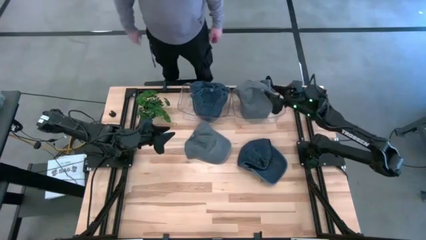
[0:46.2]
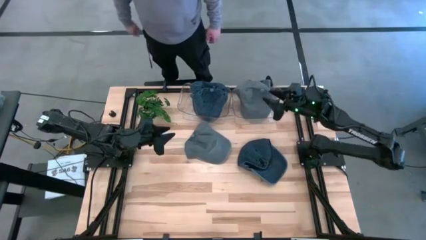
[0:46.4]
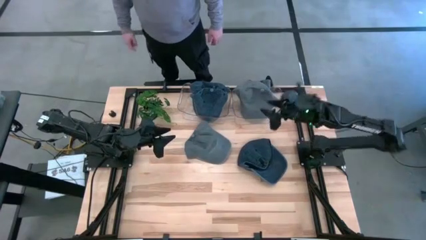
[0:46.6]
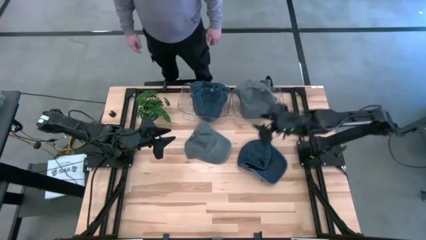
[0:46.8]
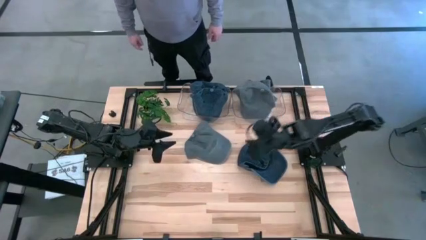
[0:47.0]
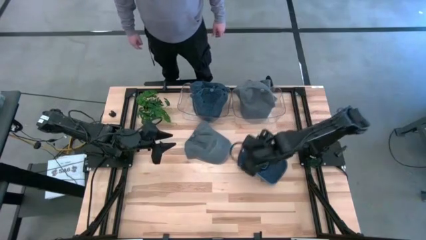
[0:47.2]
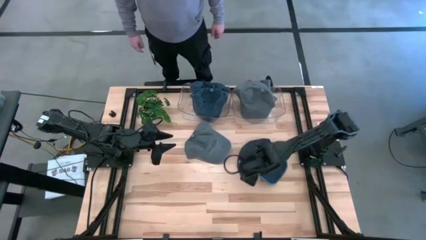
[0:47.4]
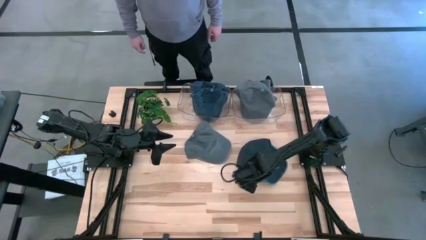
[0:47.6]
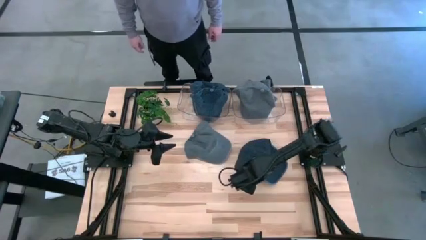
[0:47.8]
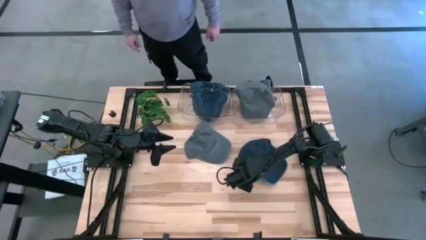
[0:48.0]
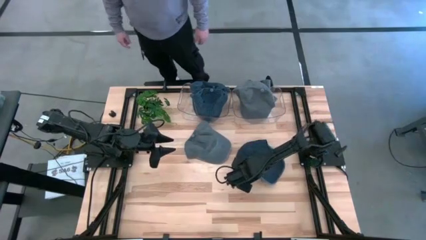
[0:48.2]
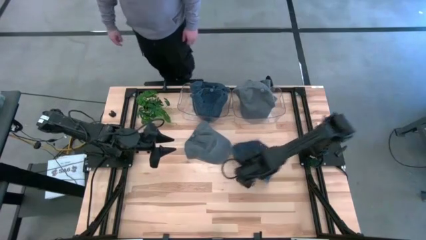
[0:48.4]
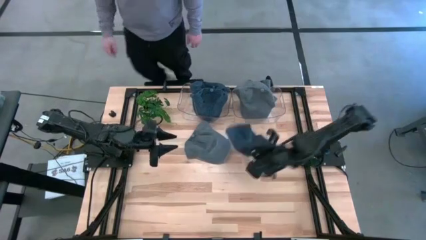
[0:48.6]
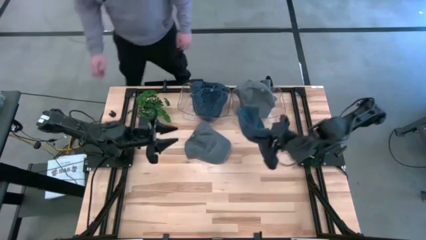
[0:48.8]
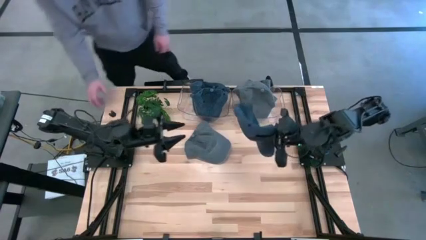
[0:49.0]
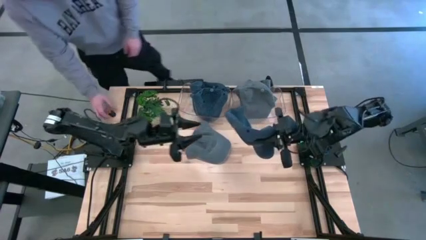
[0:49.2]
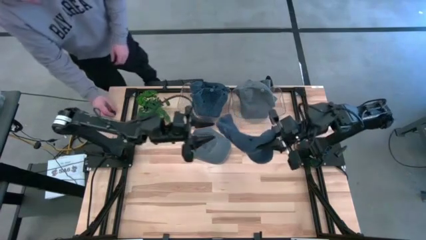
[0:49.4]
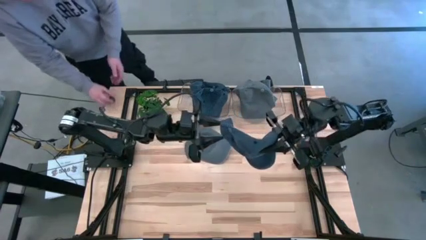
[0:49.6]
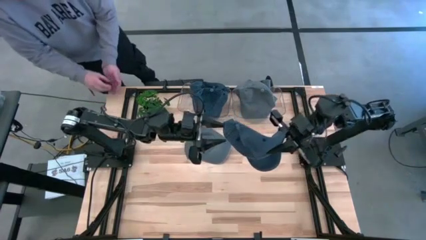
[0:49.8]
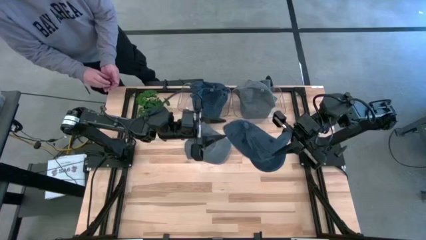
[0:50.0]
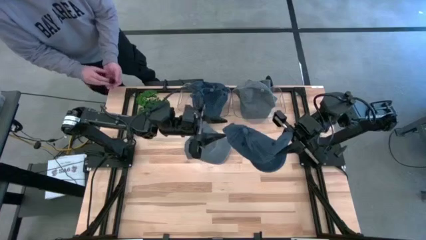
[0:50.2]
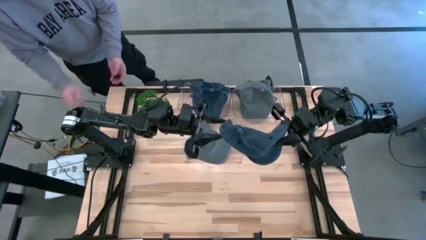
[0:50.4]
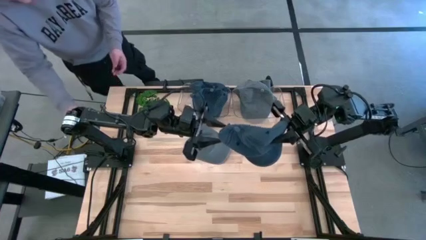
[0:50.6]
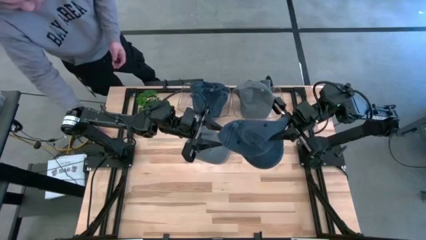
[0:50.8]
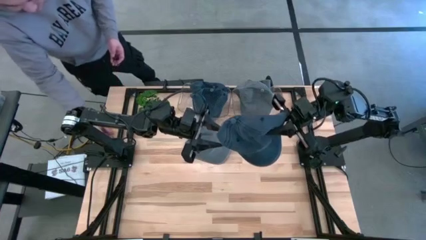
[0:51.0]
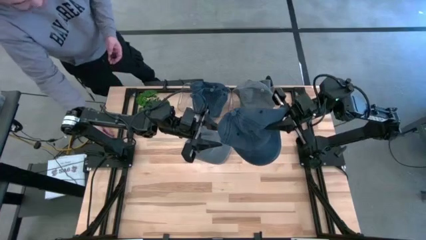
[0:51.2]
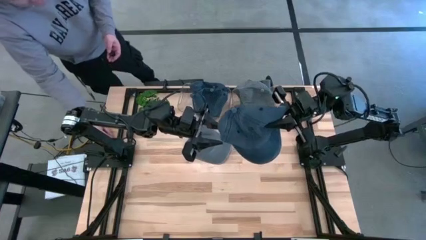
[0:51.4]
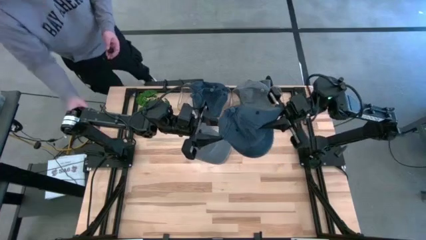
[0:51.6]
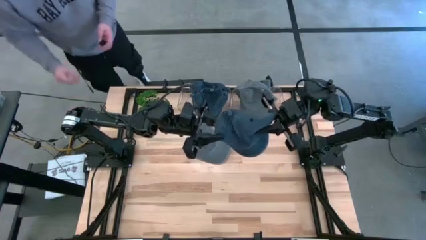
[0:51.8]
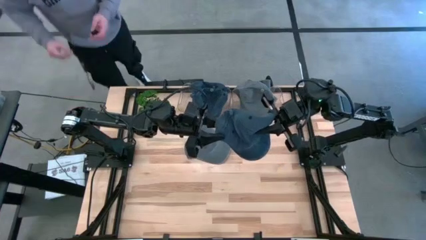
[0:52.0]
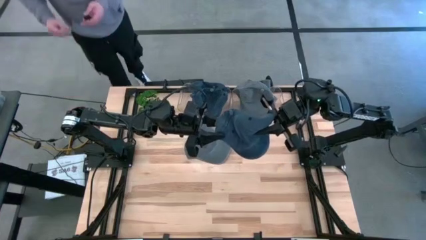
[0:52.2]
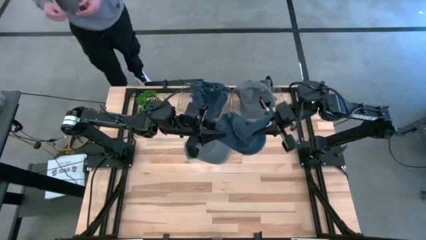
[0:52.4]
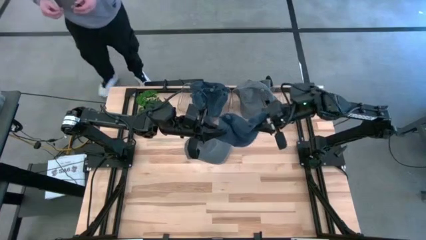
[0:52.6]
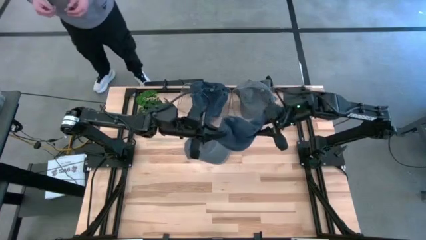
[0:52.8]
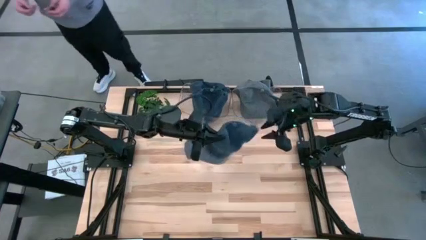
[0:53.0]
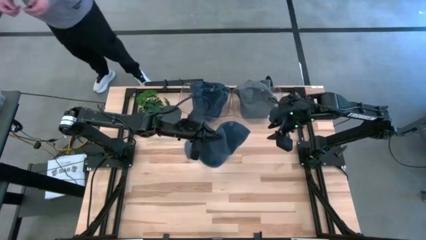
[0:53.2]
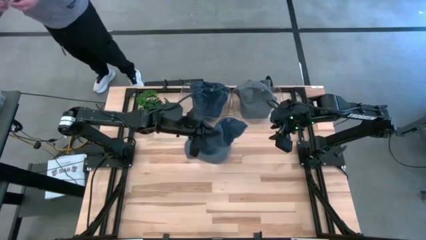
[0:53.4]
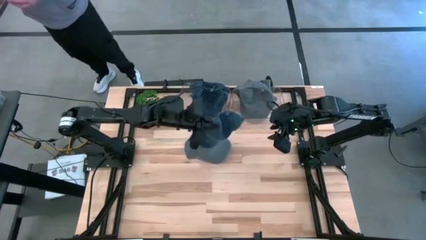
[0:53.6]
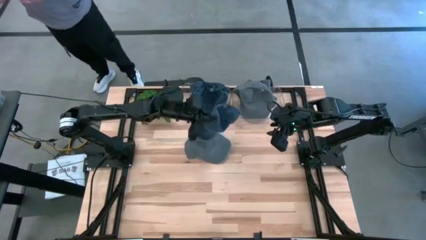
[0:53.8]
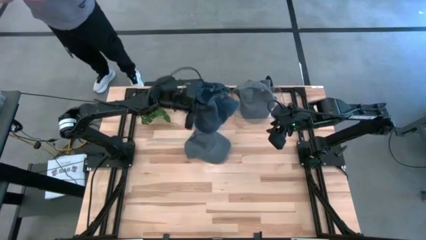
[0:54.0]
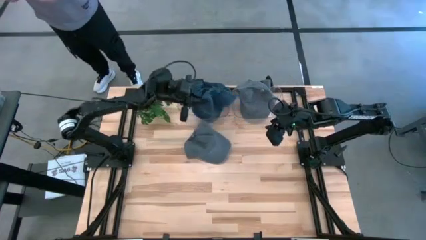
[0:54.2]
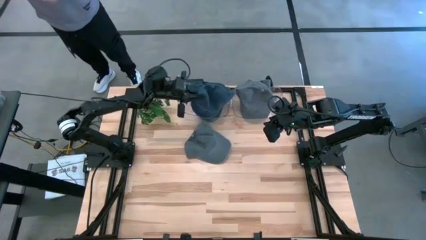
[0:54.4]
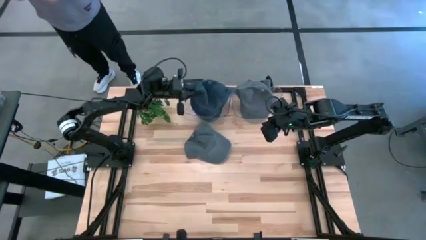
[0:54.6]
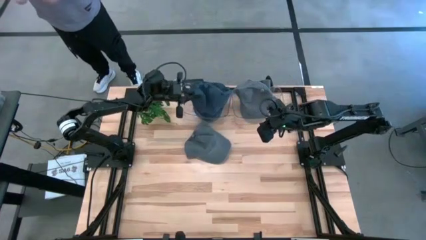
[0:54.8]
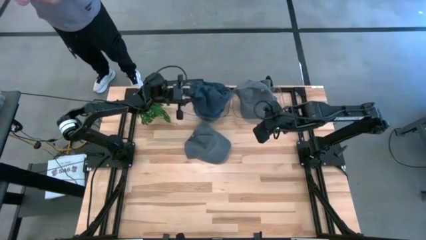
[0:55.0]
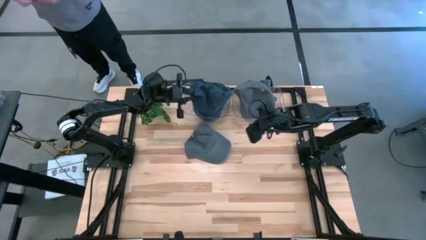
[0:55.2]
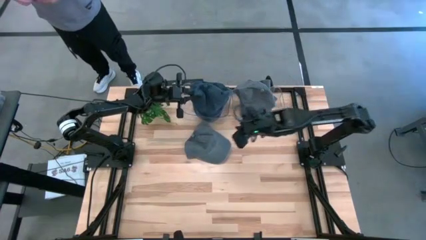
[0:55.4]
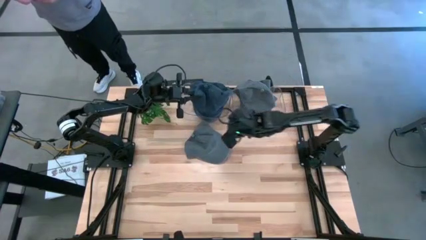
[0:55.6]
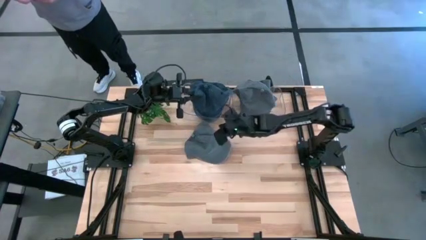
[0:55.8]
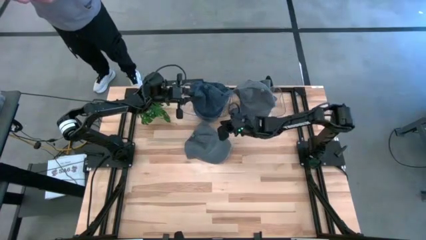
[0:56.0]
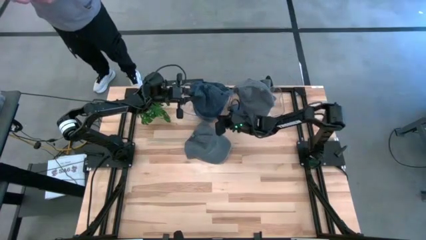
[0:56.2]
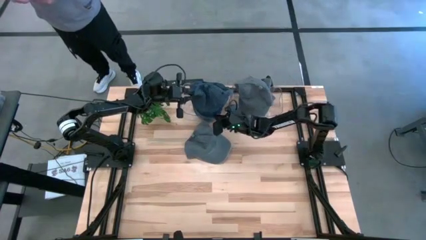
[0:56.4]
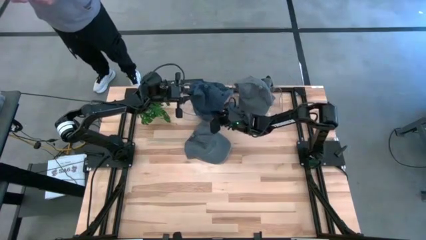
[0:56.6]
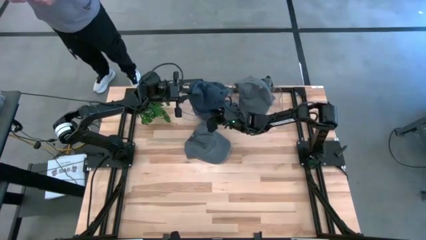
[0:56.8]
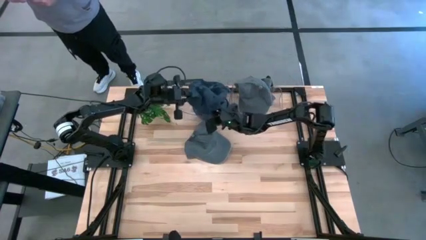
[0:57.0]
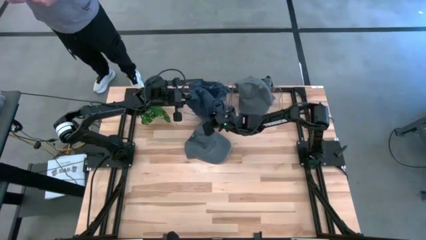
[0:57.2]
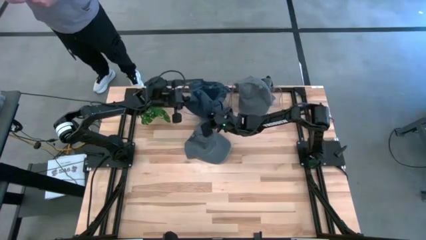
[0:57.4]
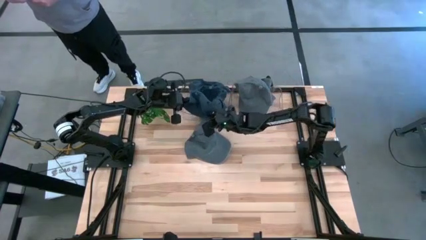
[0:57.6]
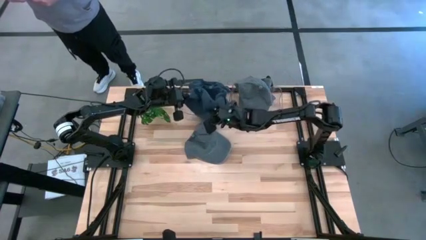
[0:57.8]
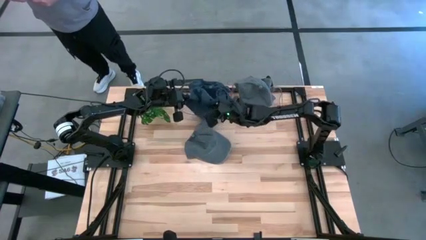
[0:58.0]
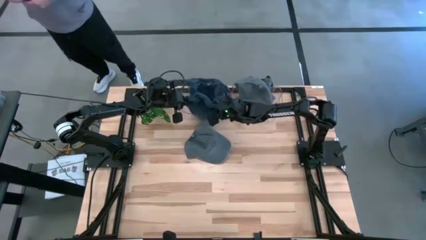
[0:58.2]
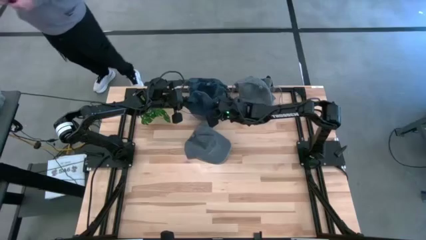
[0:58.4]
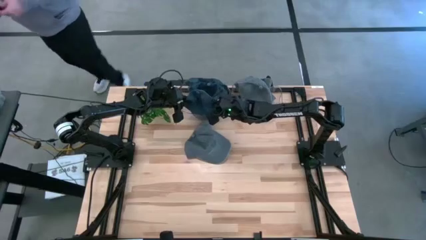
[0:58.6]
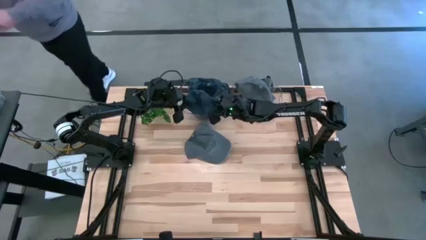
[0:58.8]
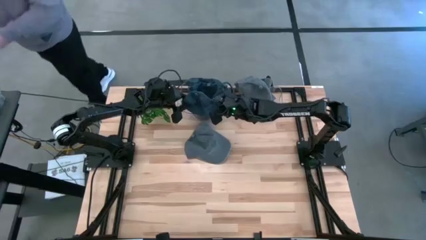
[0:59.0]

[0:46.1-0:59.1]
Task: Pick & Place hat
Put the blue cap into the left transparent bin
